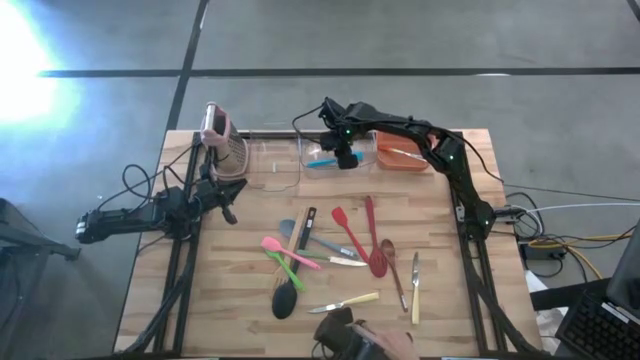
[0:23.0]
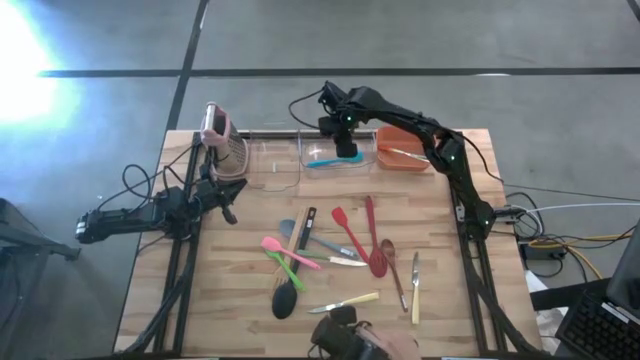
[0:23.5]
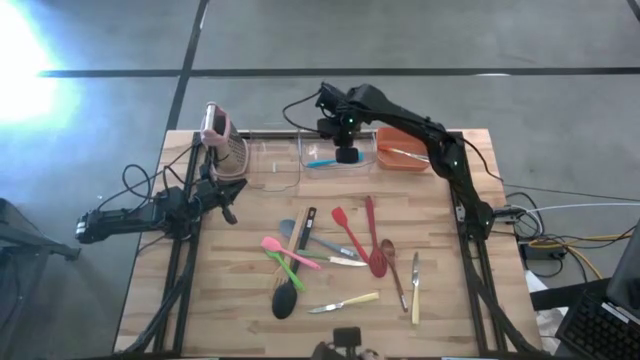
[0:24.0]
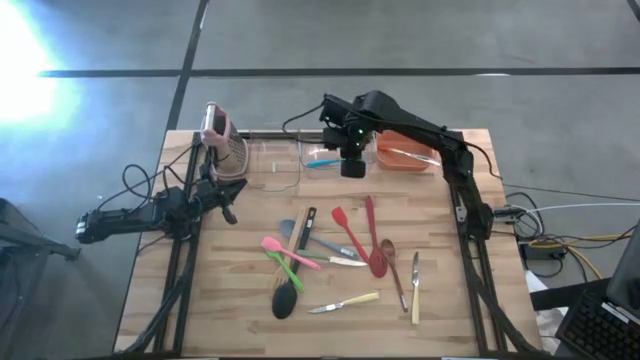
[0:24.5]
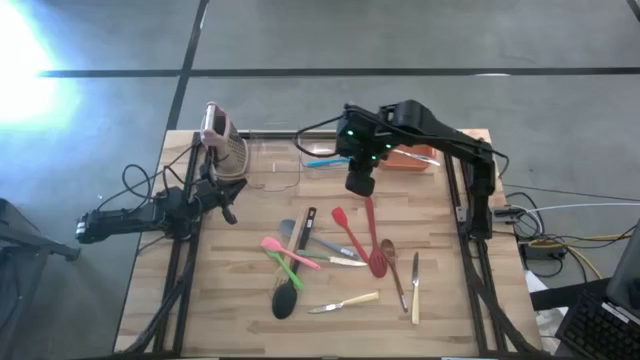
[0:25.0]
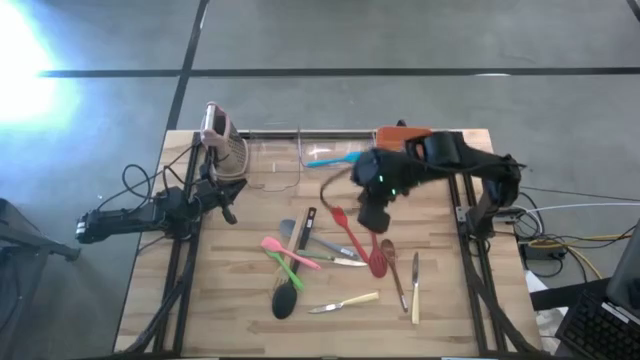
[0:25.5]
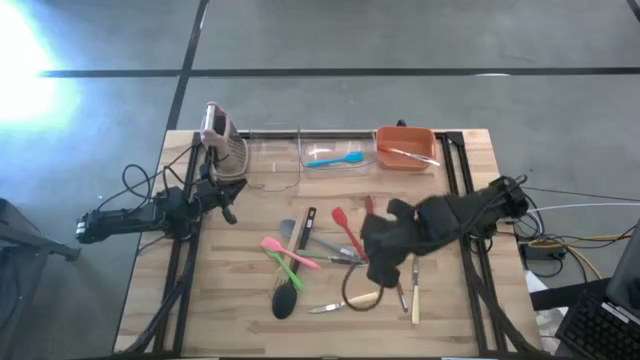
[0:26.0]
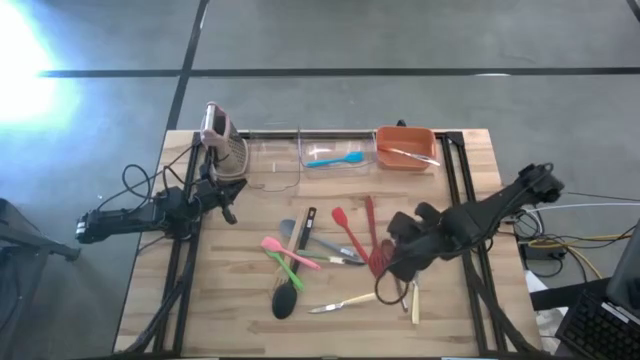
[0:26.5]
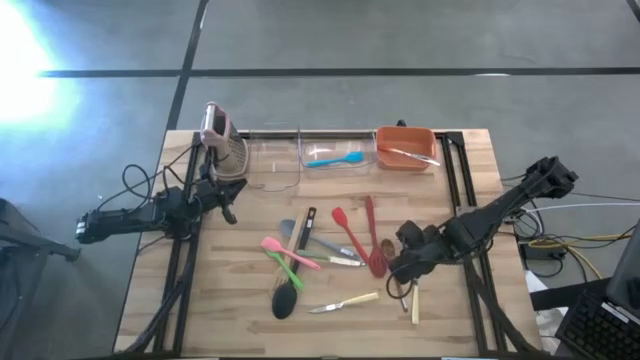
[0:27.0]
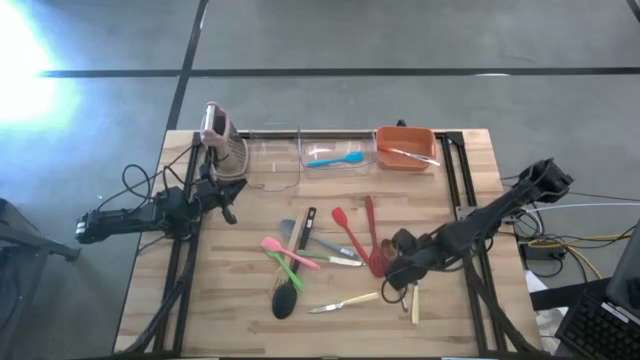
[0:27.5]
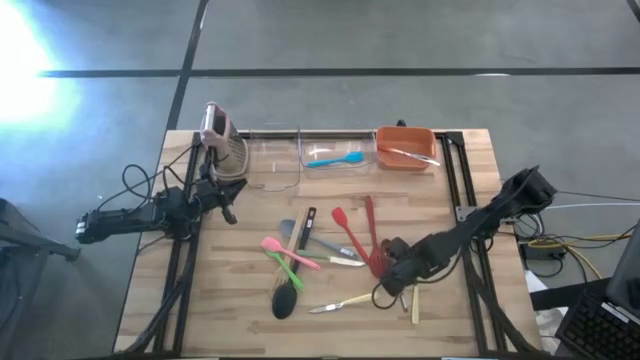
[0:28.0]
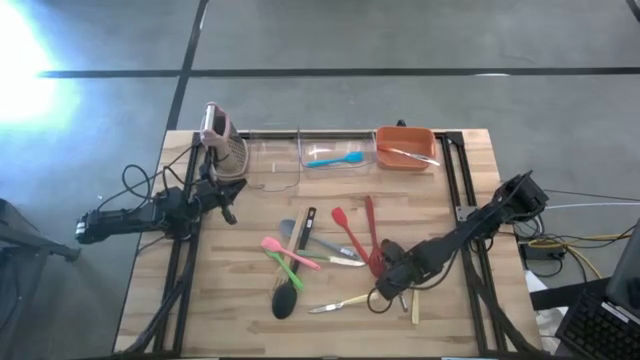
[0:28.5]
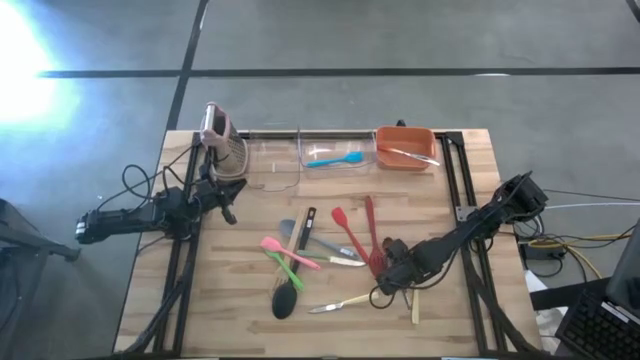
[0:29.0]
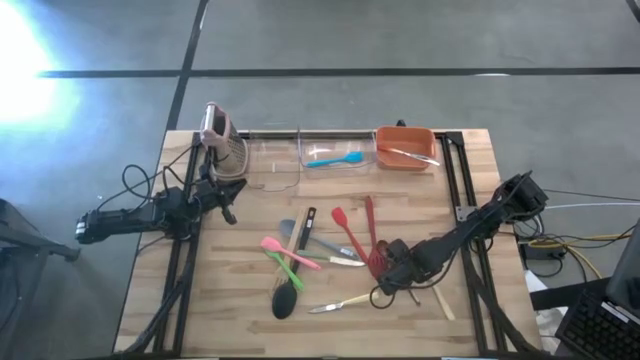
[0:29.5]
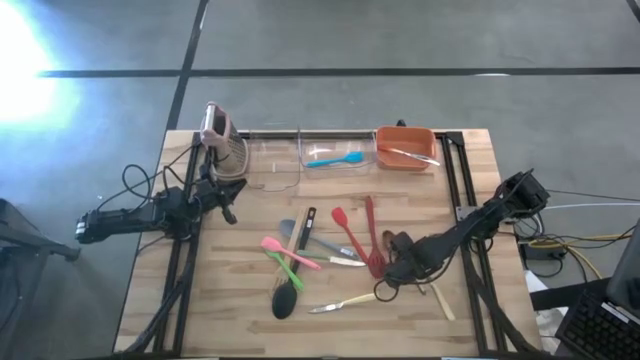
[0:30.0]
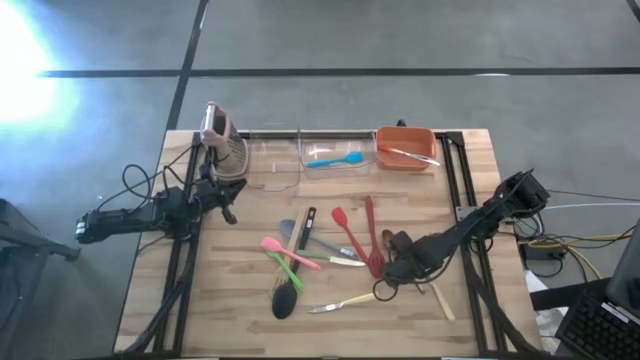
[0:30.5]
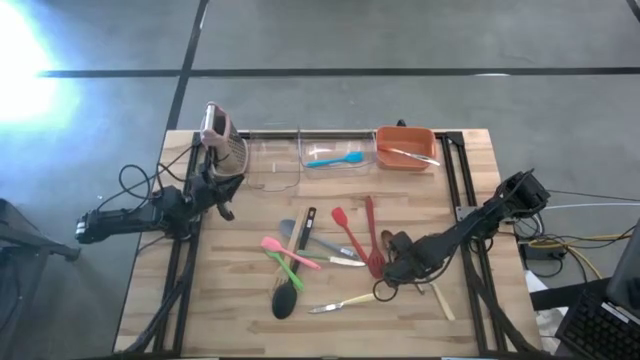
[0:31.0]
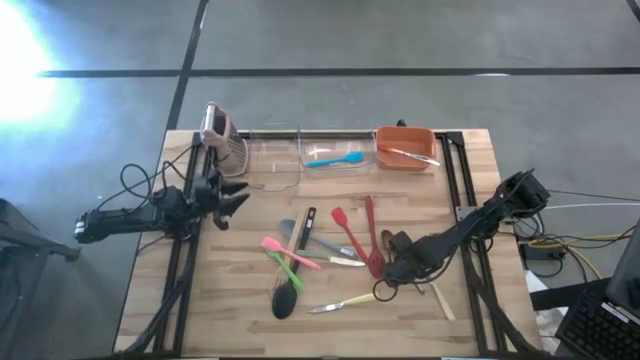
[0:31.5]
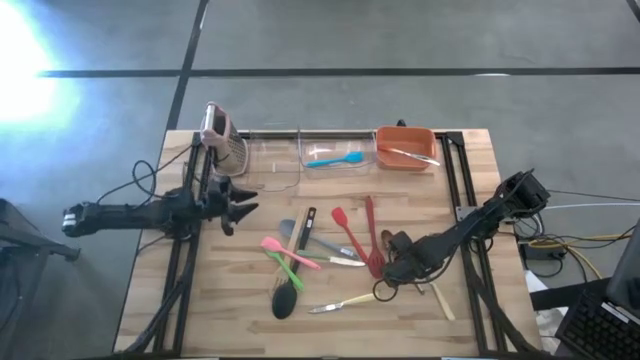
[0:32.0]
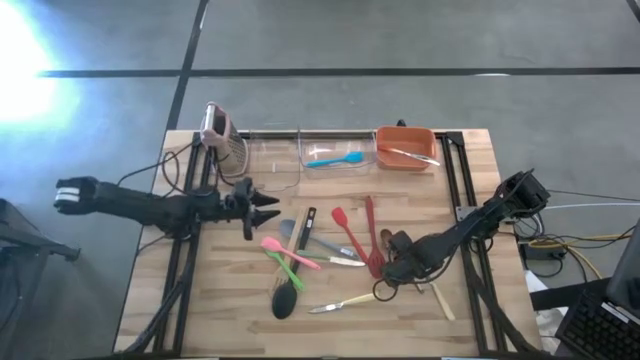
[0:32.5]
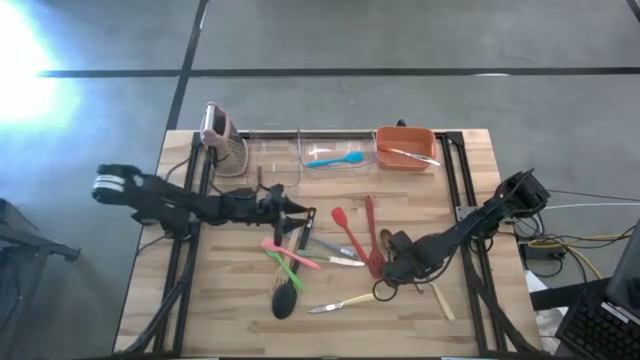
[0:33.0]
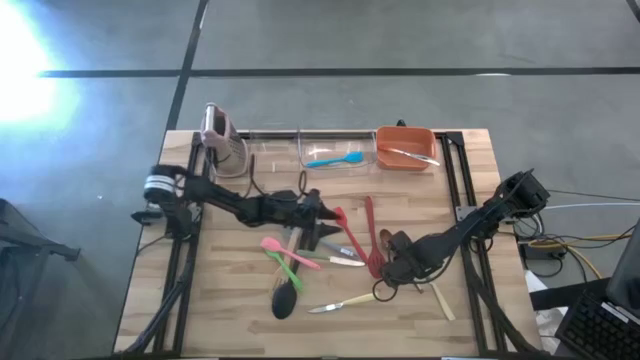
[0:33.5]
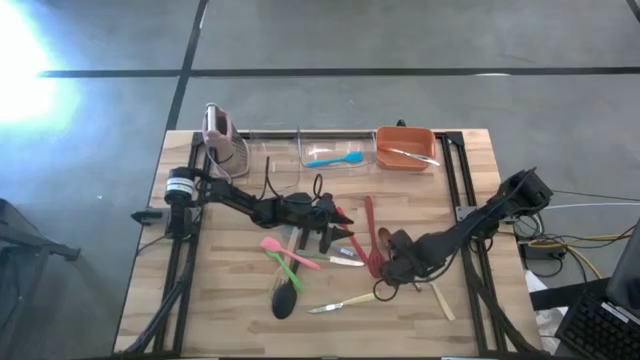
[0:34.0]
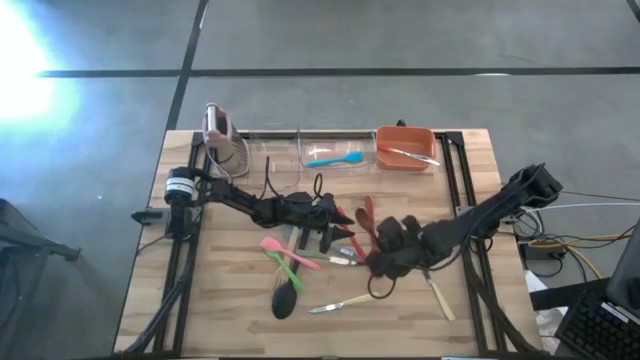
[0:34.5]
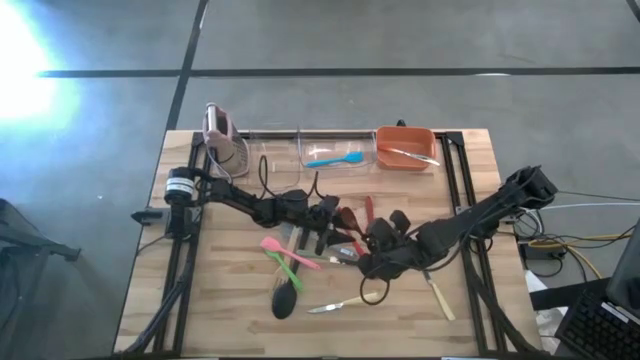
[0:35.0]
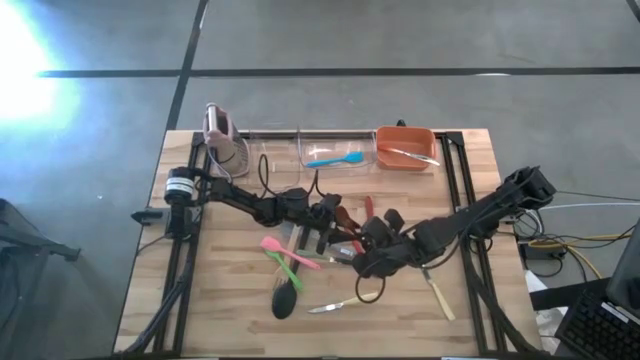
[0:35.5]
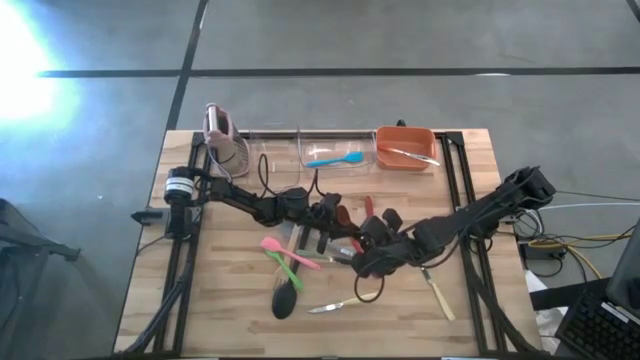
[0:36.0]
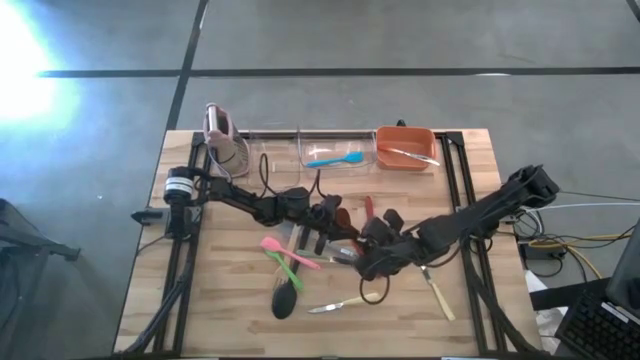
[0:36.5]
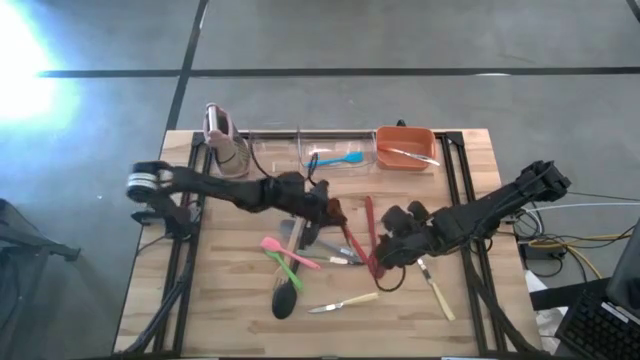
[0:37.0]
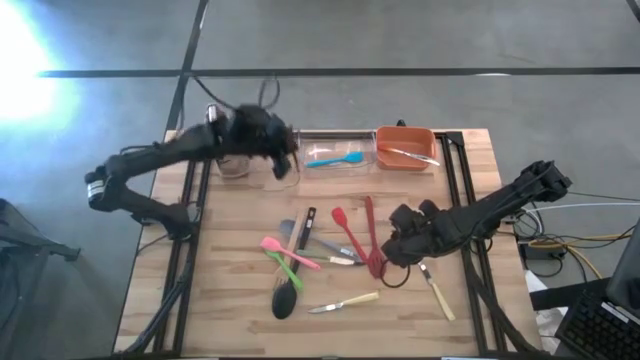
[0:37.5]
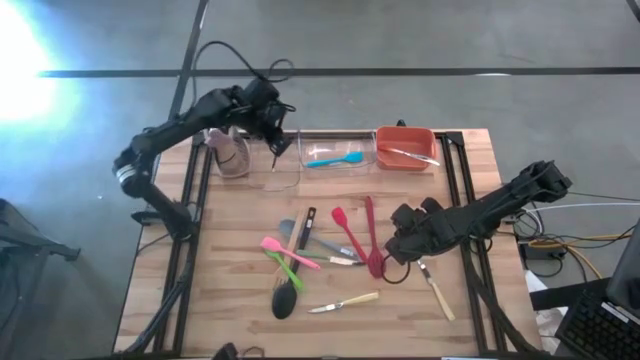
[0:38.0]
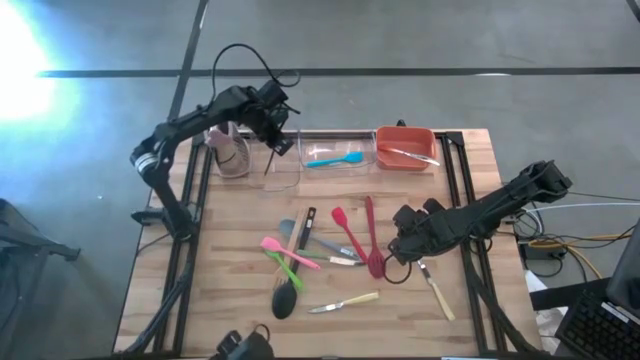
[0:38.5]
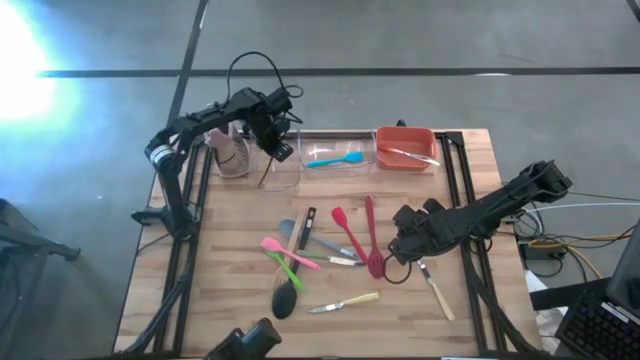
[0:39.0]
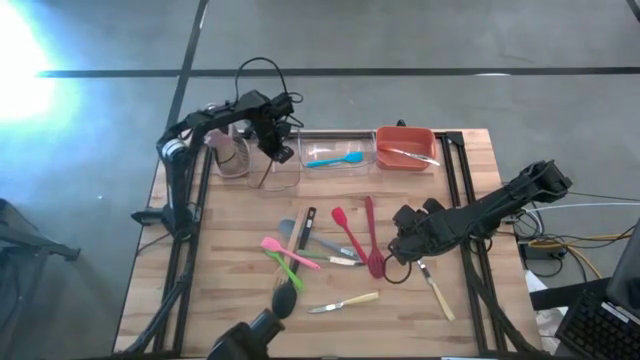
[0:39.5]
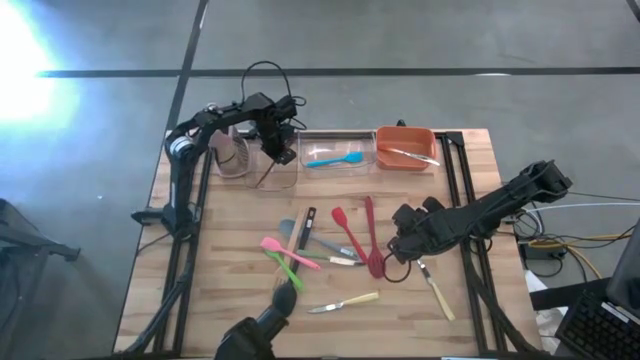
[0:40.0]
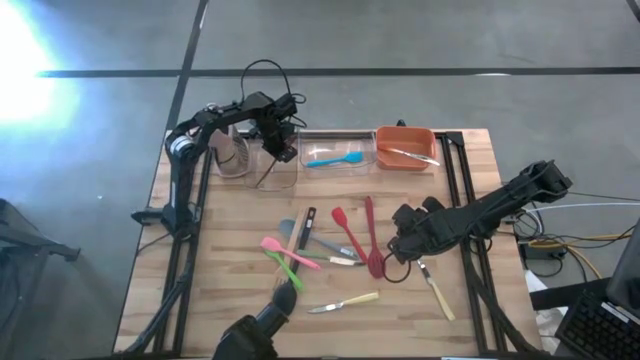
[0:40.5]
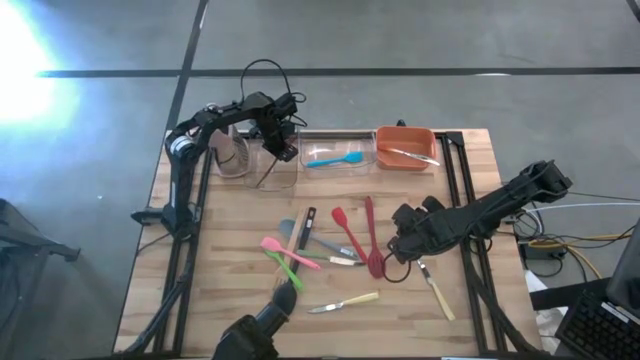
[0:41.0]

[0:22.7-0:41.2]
Task: Pick & Place Kitchen Items
Put the brown serving spoon into the left transparent bin
